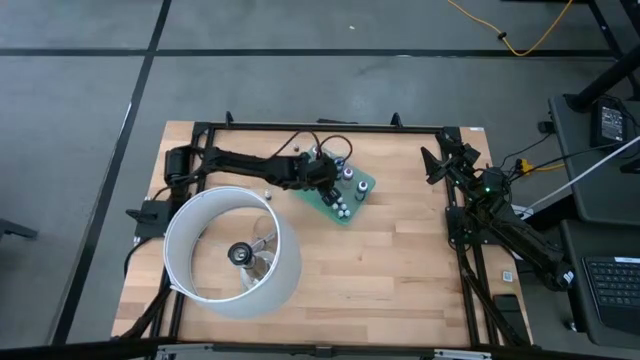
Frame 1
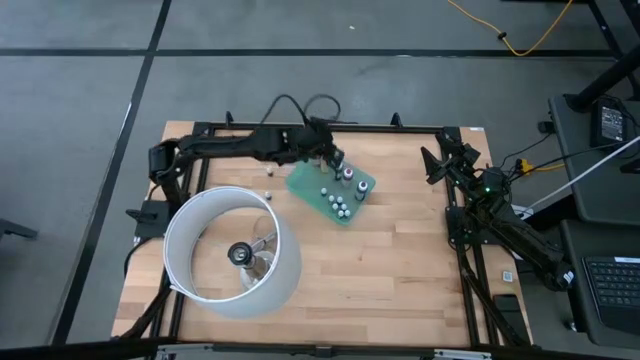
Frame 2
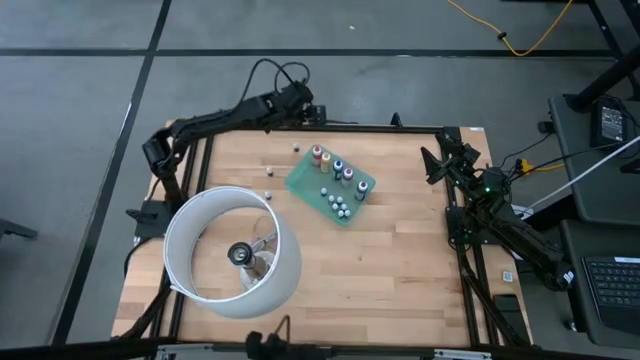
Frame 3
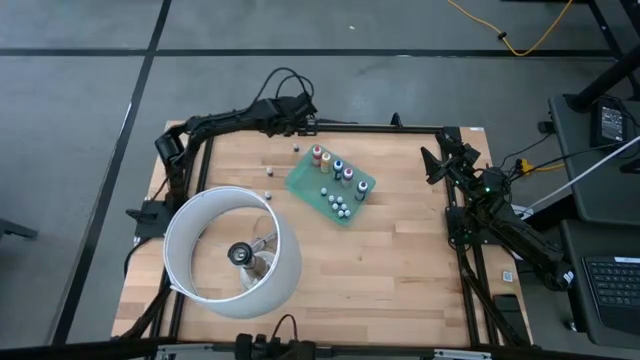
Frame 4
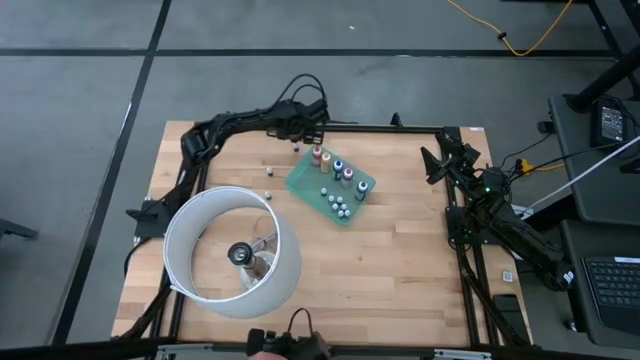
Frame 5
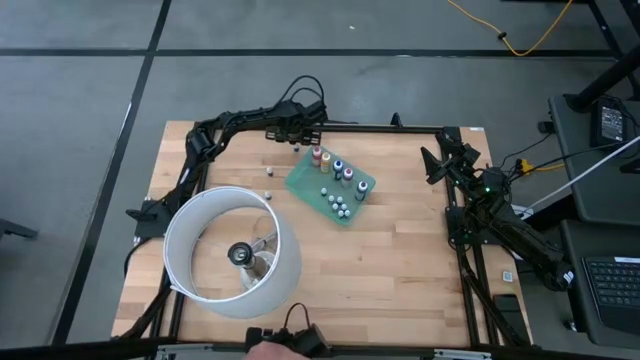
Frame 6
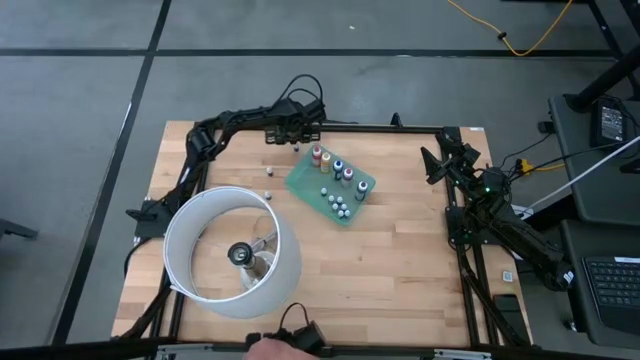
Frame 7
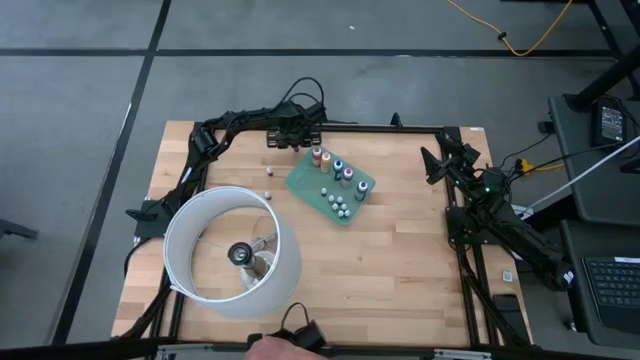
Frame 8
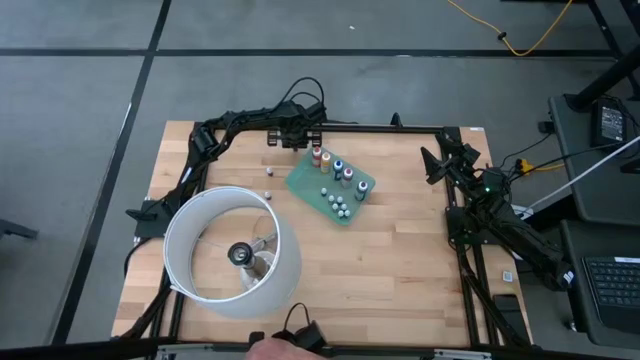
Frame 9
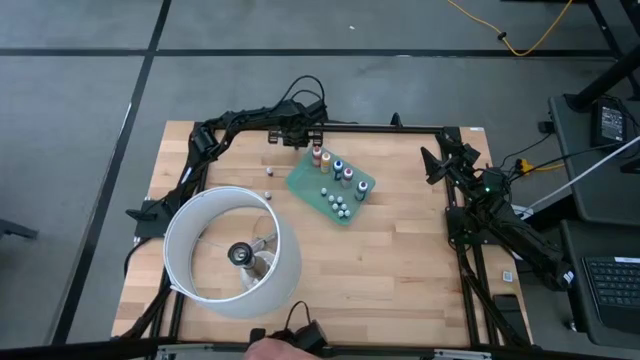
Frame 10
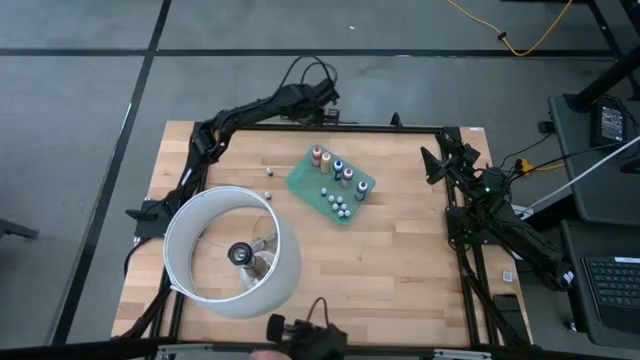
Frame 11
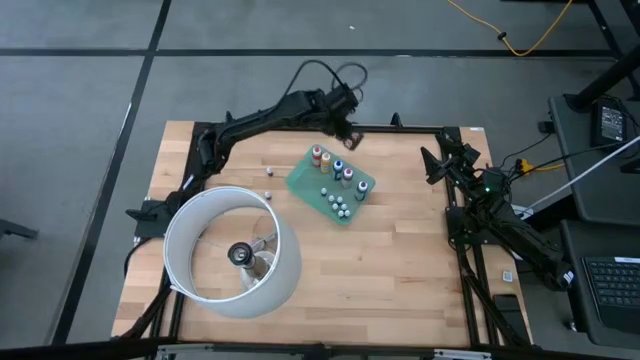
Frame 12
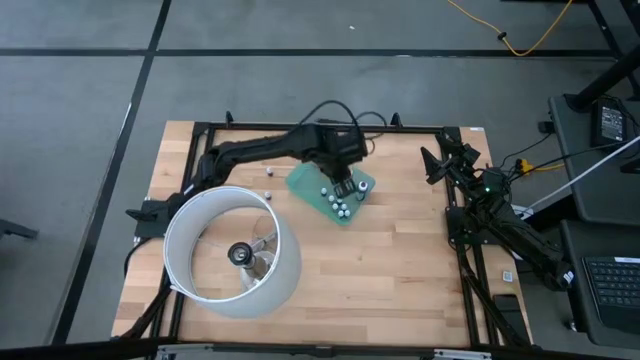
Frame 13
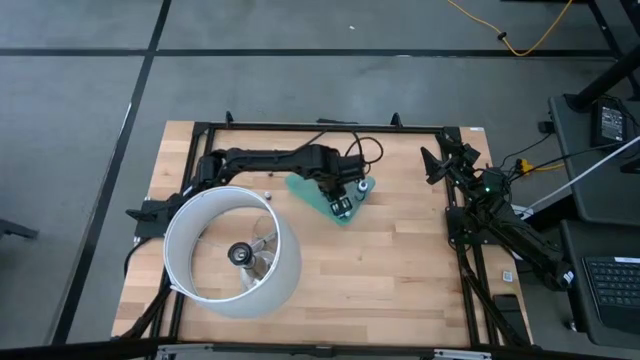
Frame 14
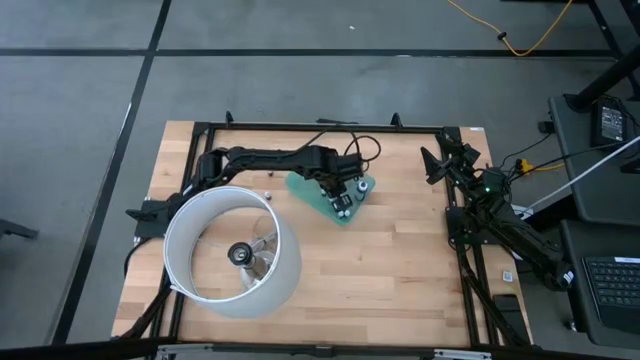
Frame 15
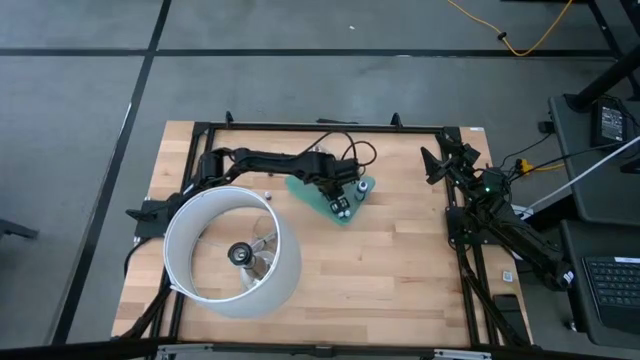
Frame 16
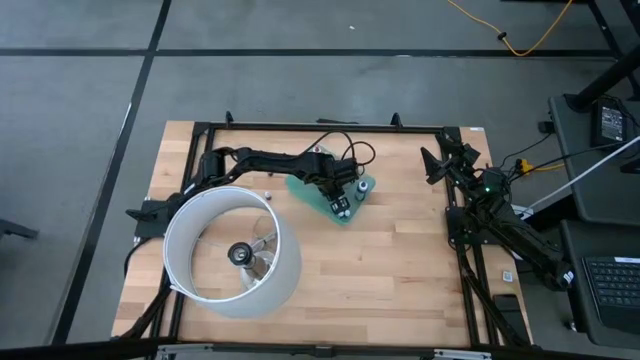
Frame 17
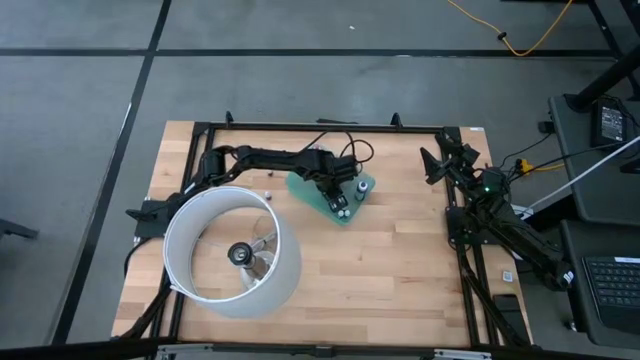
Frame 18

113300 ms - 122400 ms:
Task: Pick & Place food coloring
Put the small red food coloring bottle into the green bin

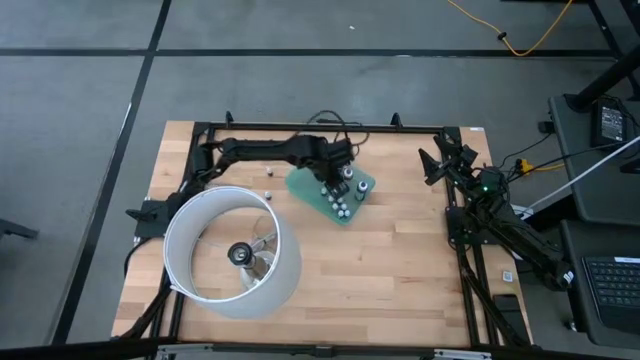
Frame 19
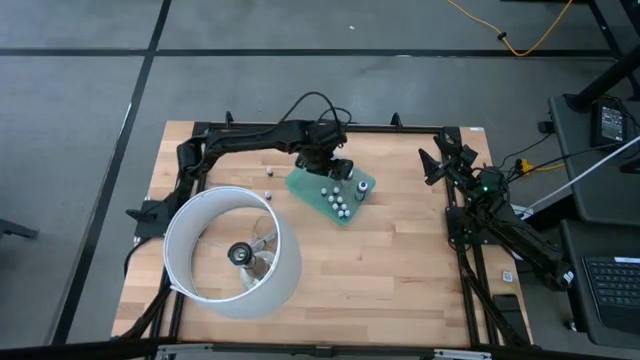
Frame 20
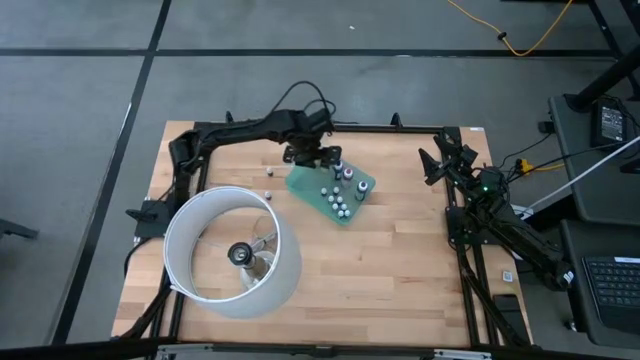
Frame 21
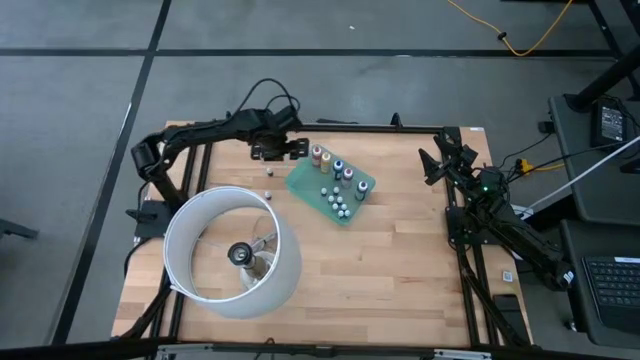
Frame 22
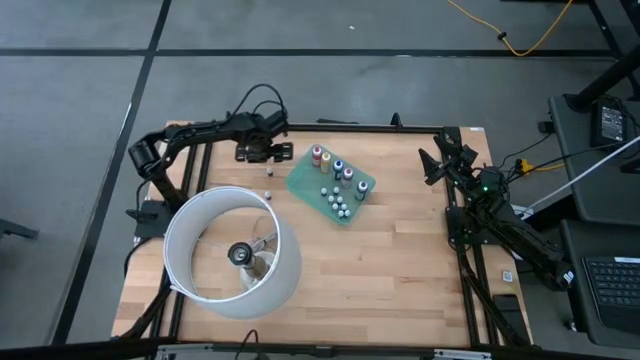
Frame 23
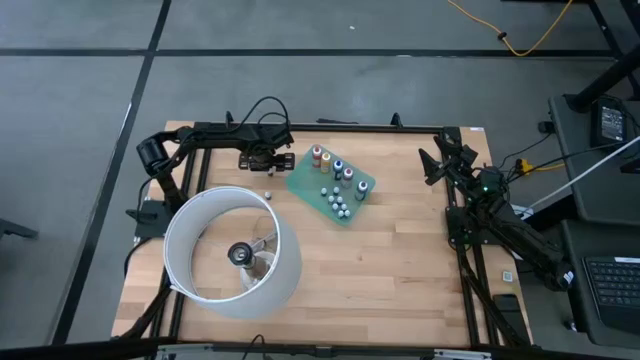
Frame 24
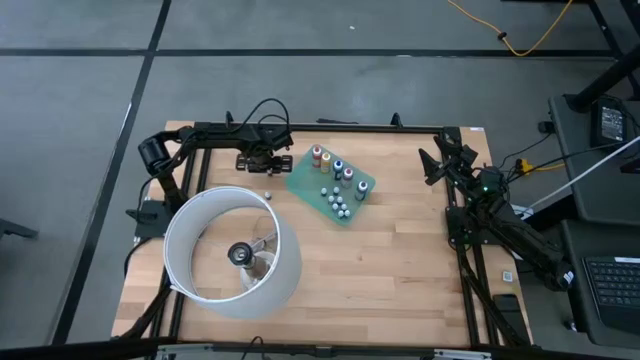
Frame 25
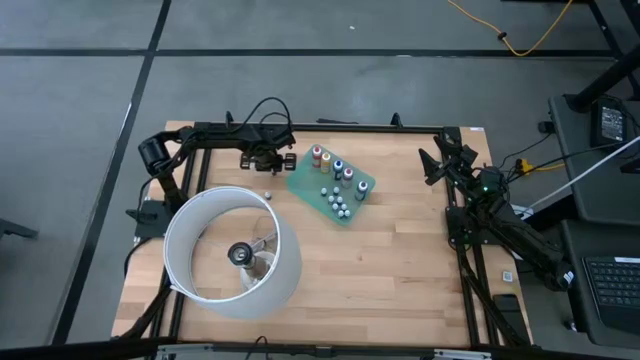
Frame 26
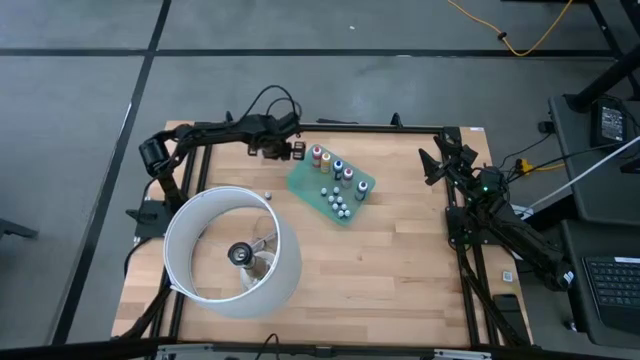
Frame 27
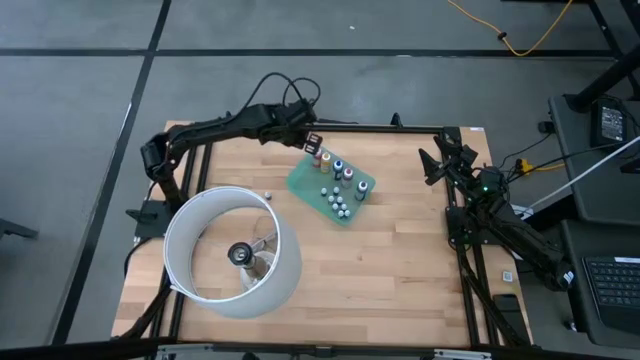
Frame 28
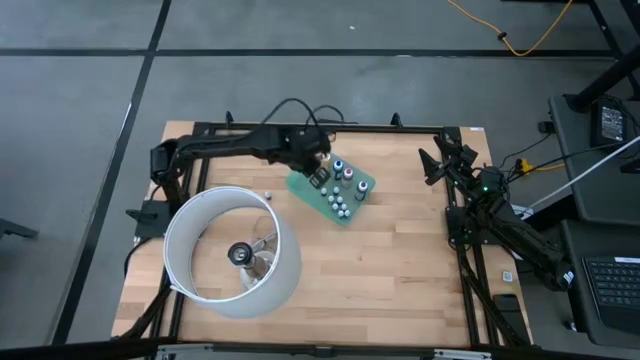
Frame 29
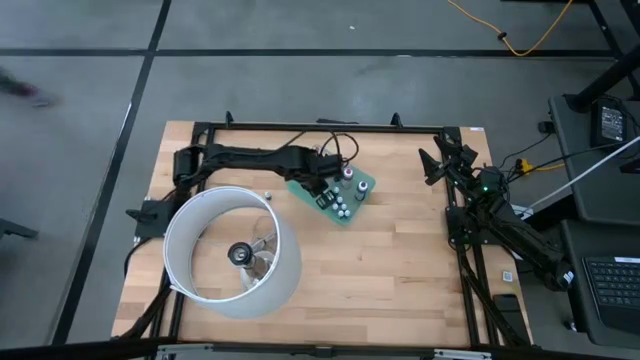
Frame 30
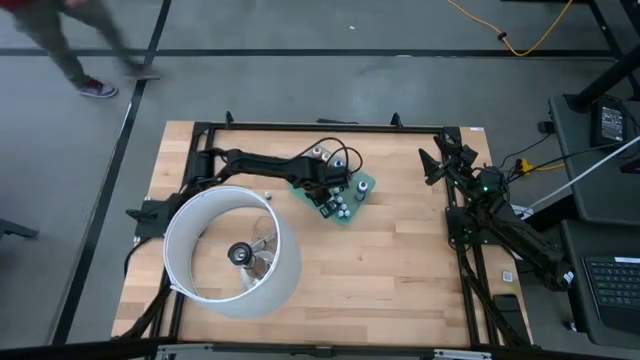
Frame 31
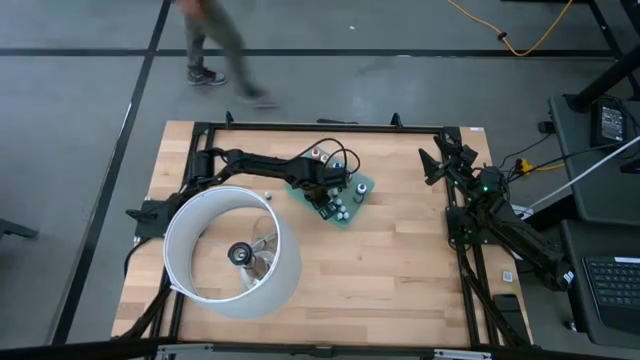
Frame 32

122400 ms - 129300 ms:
Put the small red food coloring bottle into the green bin

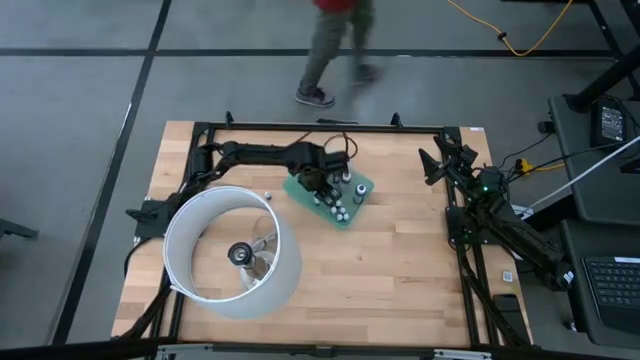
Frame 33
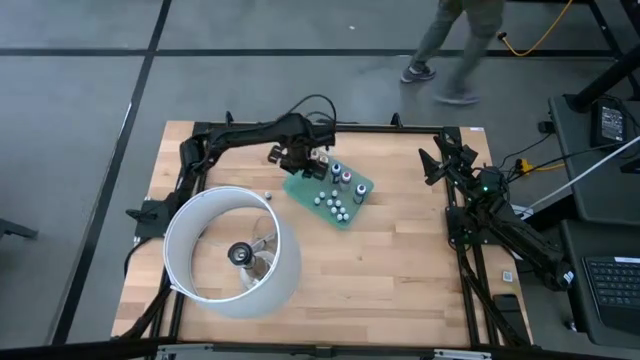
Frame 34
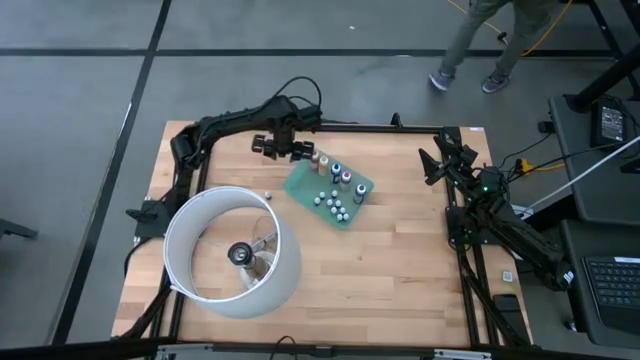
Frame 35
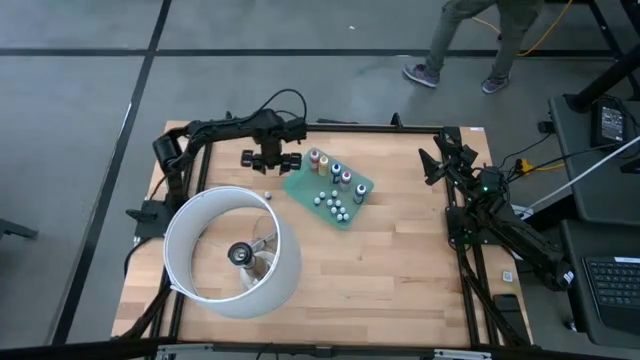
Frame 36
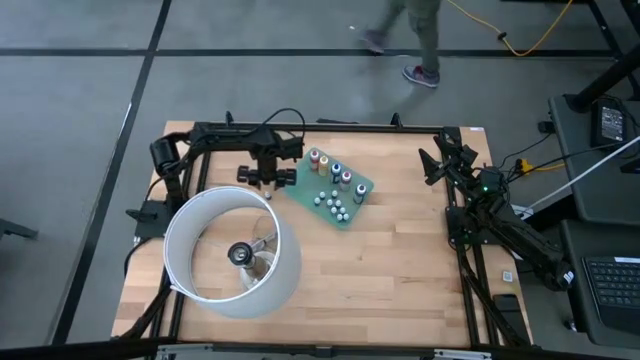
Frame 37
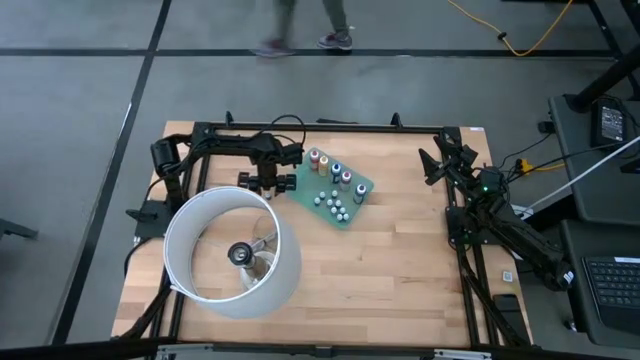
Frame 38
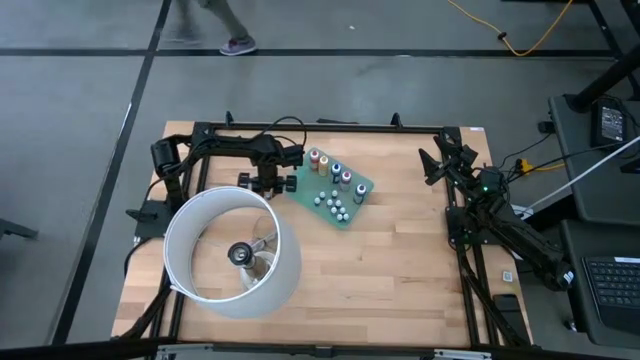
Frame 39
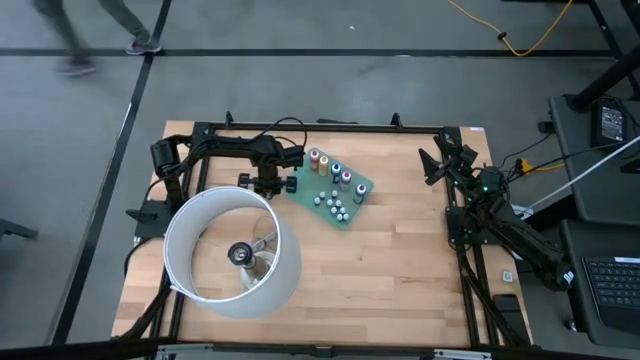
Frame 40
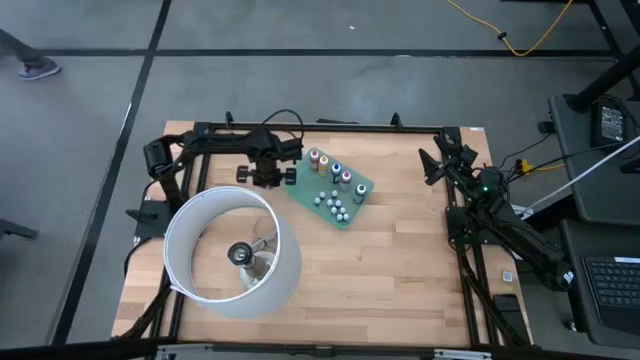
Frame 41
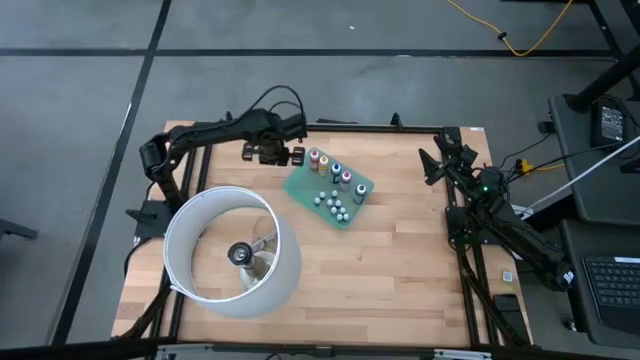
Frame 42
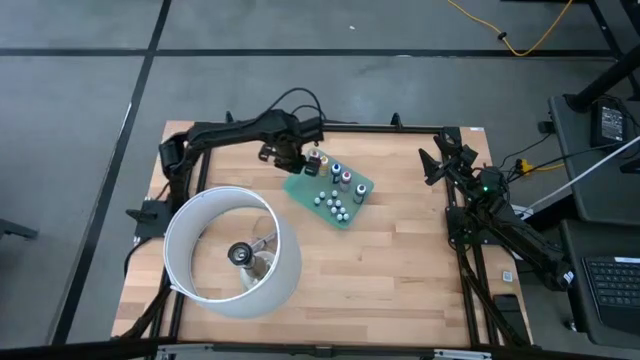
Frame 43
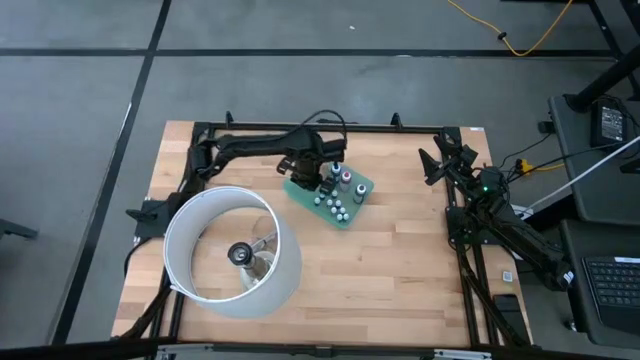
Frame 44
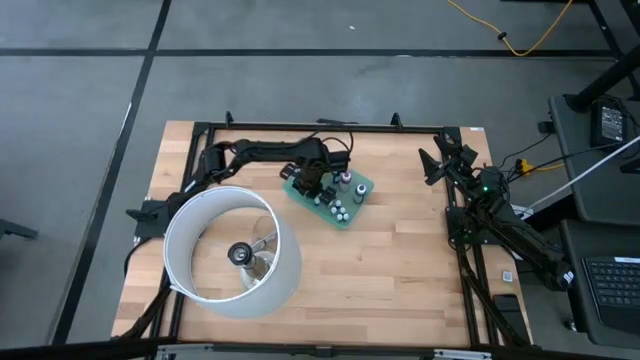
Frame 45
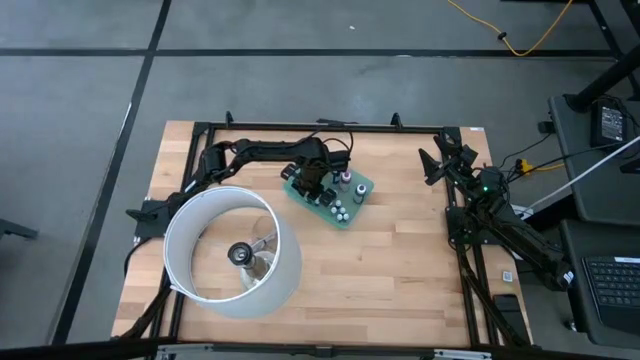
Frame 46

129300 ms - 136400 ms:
Put the small black food coloring bottle into the green bin
